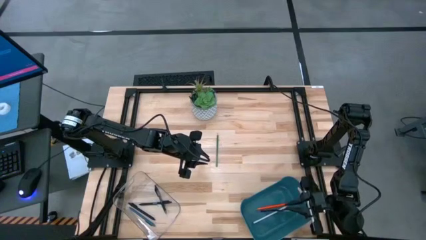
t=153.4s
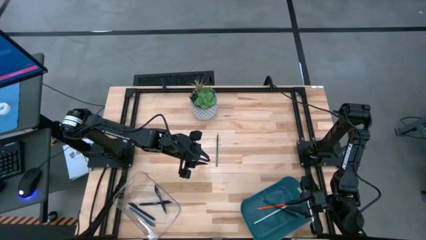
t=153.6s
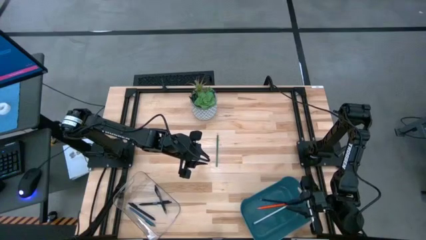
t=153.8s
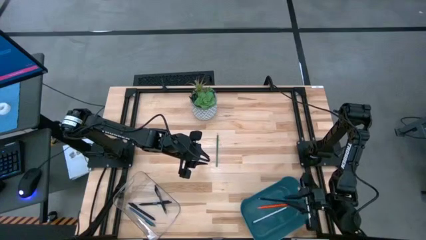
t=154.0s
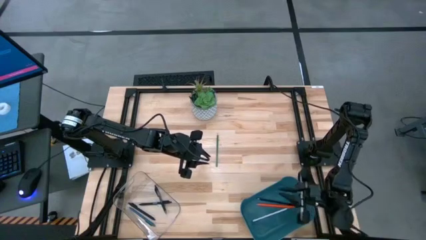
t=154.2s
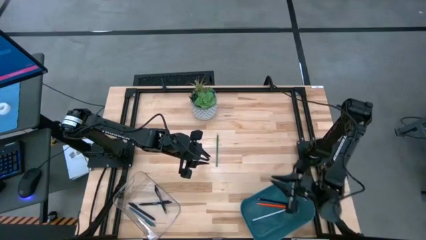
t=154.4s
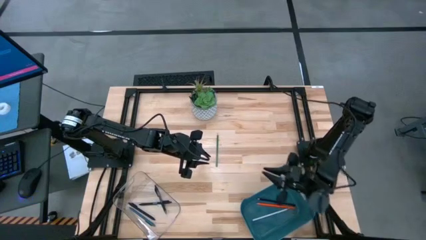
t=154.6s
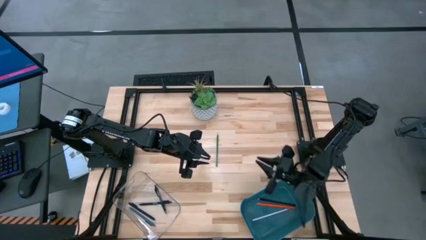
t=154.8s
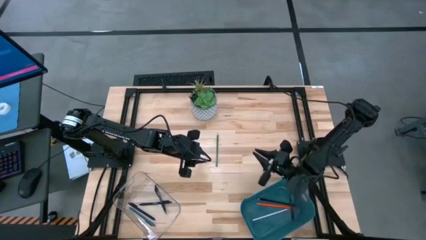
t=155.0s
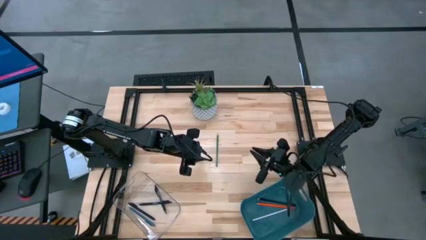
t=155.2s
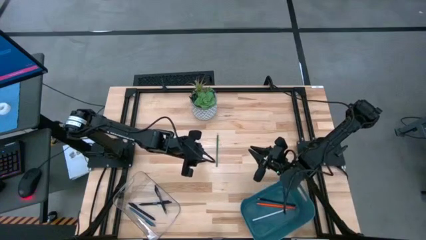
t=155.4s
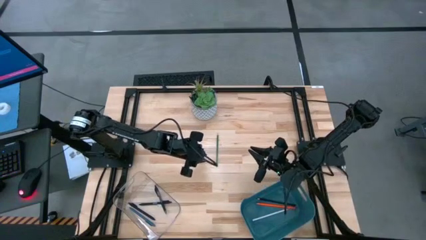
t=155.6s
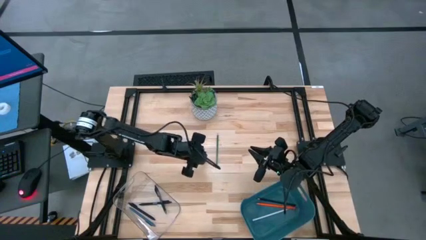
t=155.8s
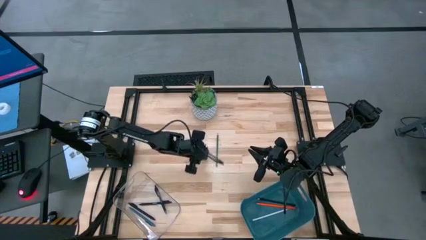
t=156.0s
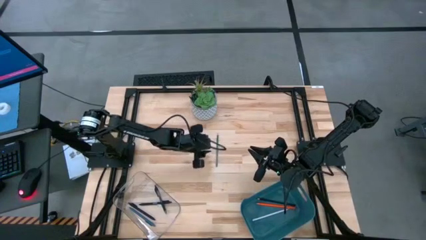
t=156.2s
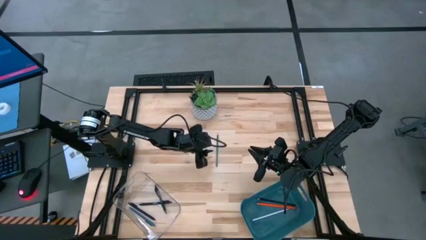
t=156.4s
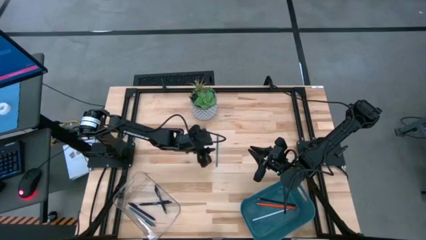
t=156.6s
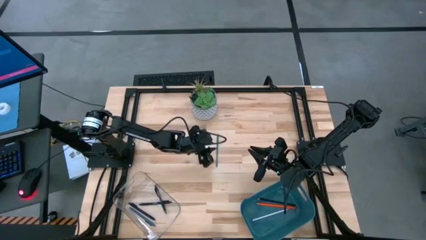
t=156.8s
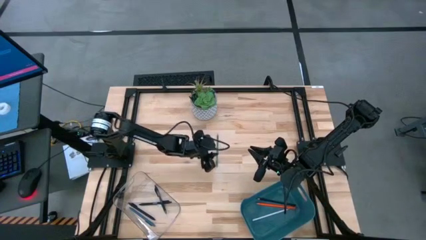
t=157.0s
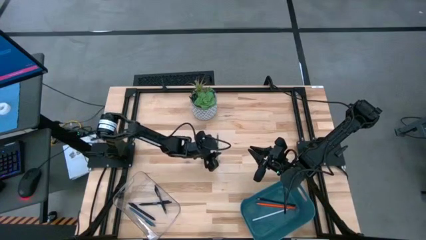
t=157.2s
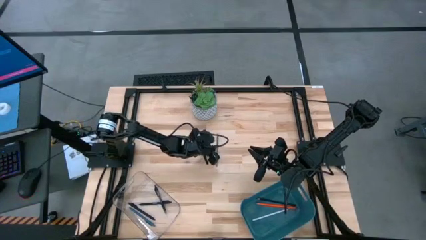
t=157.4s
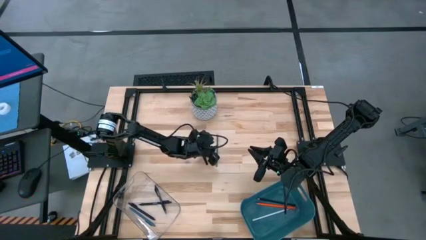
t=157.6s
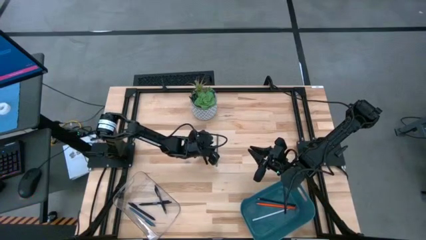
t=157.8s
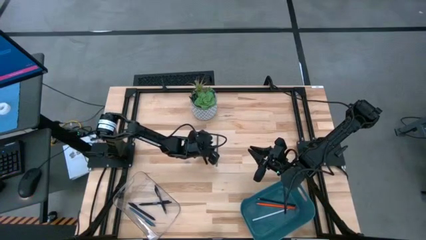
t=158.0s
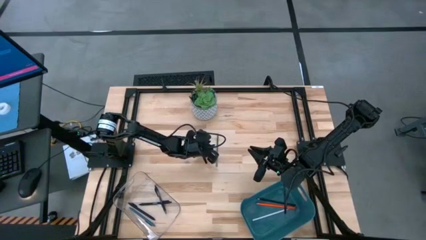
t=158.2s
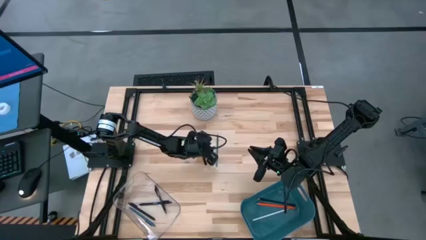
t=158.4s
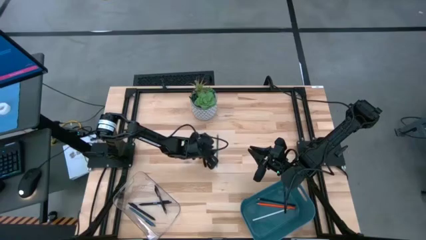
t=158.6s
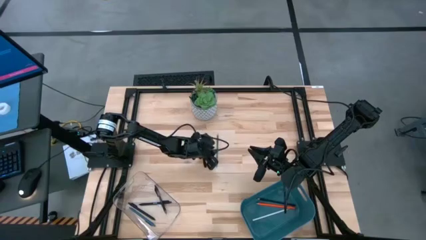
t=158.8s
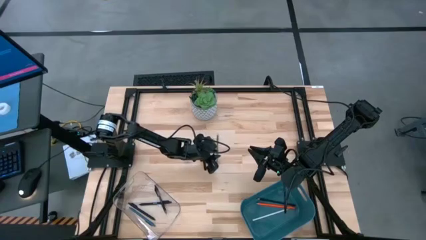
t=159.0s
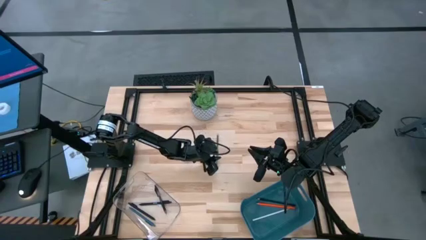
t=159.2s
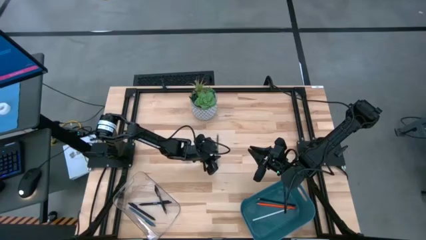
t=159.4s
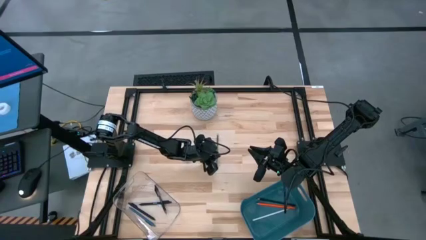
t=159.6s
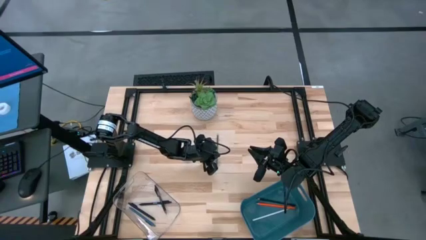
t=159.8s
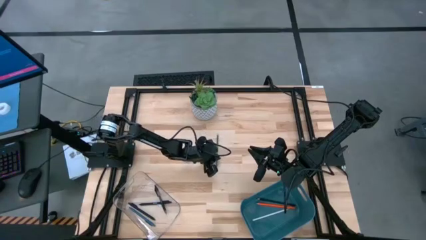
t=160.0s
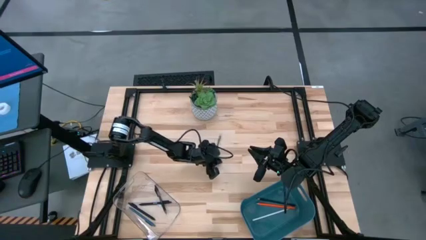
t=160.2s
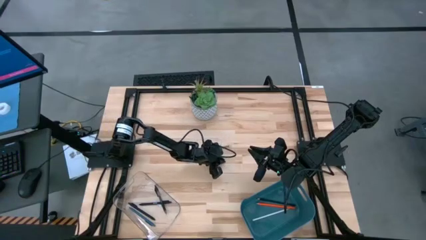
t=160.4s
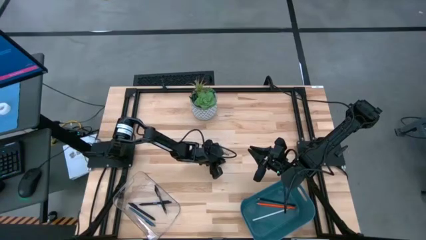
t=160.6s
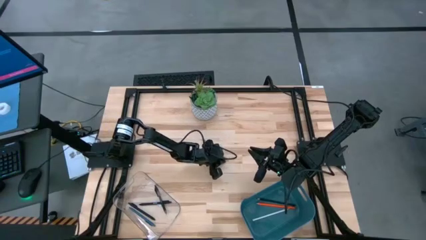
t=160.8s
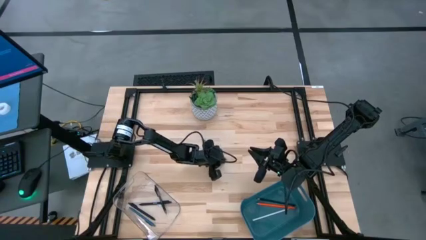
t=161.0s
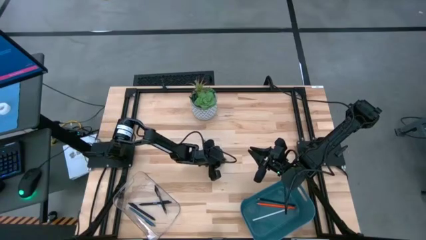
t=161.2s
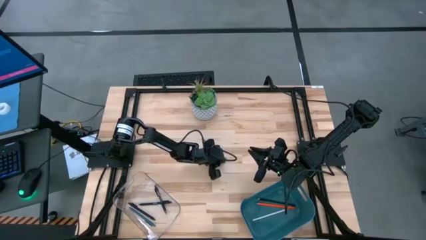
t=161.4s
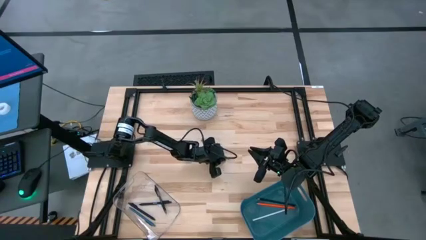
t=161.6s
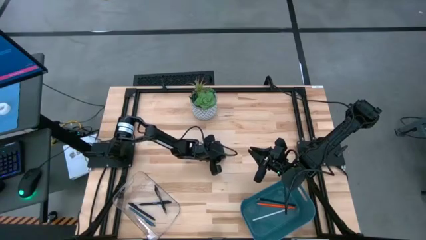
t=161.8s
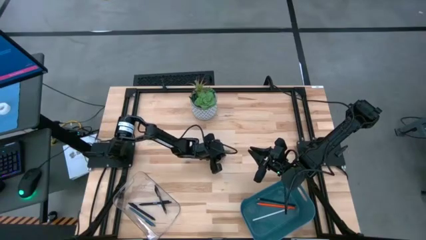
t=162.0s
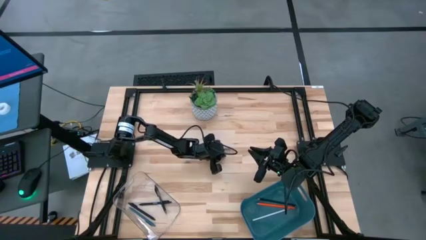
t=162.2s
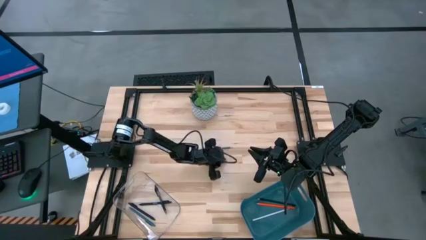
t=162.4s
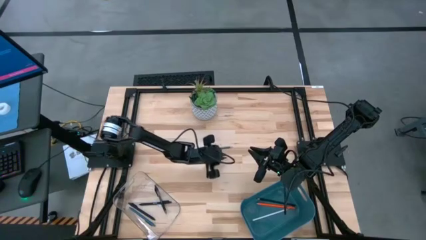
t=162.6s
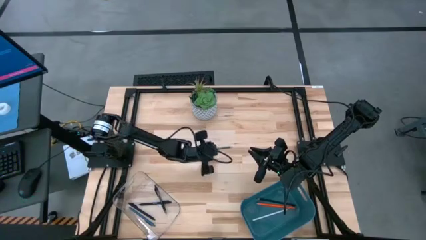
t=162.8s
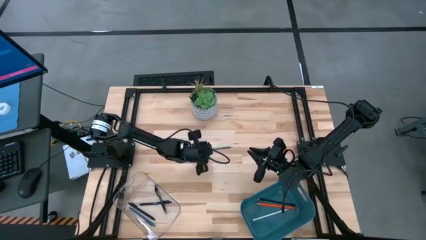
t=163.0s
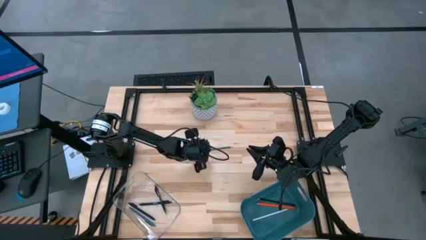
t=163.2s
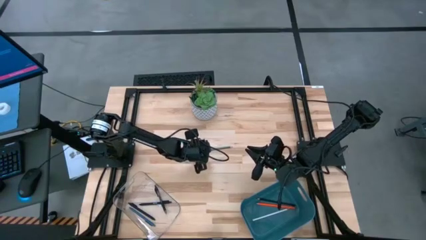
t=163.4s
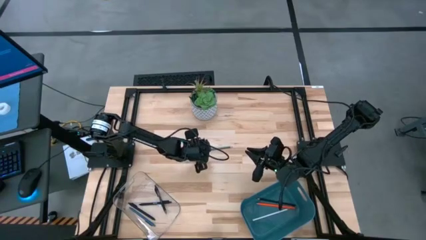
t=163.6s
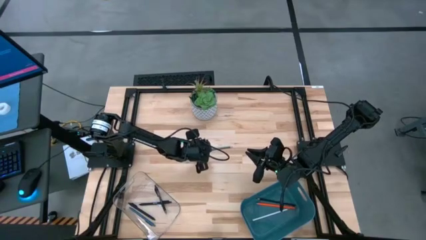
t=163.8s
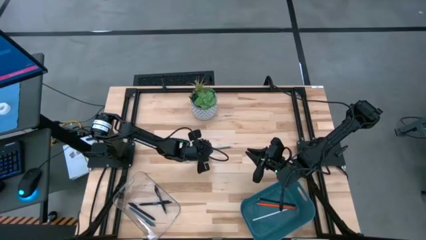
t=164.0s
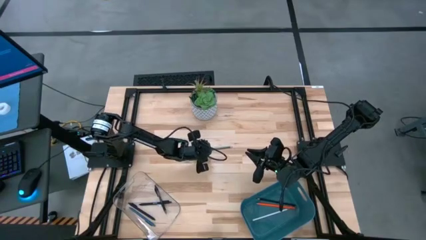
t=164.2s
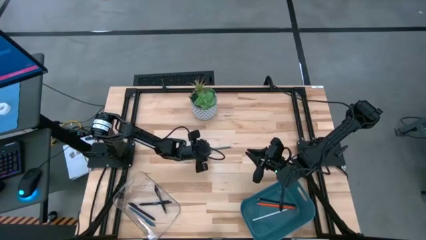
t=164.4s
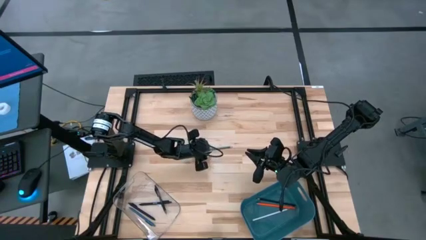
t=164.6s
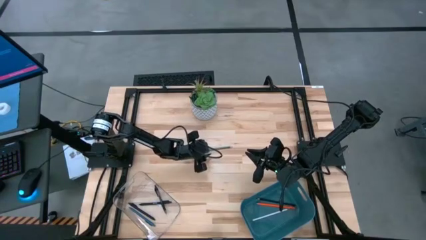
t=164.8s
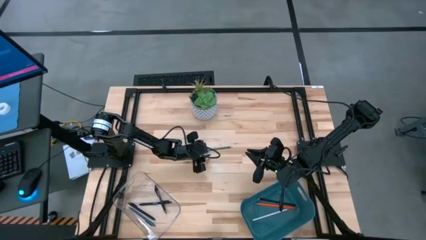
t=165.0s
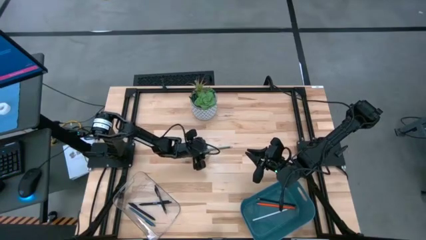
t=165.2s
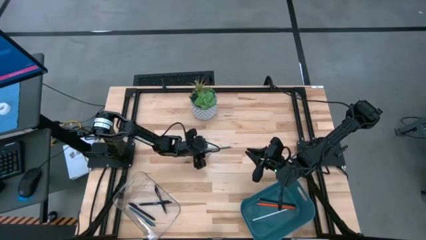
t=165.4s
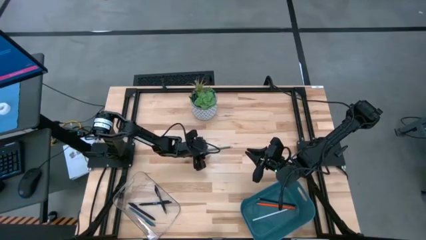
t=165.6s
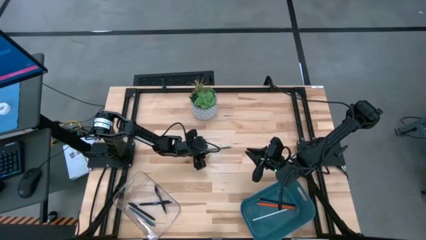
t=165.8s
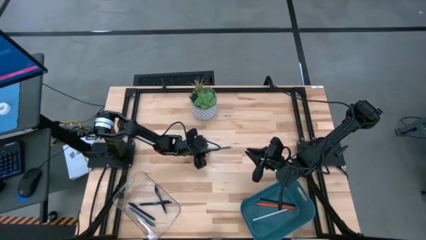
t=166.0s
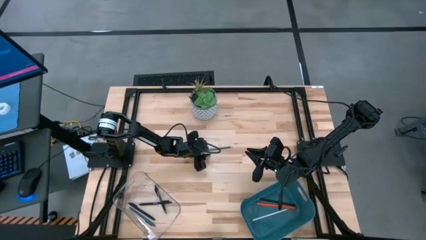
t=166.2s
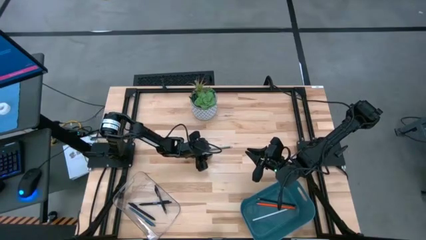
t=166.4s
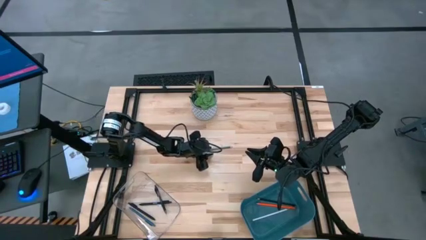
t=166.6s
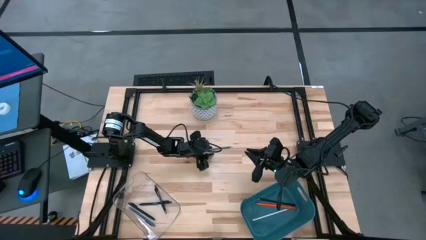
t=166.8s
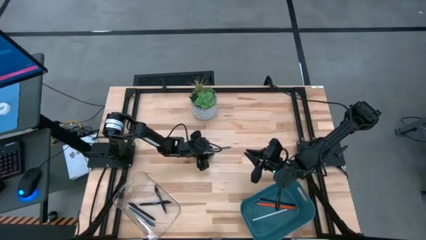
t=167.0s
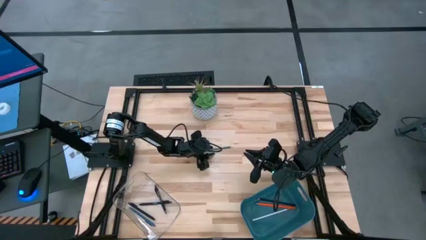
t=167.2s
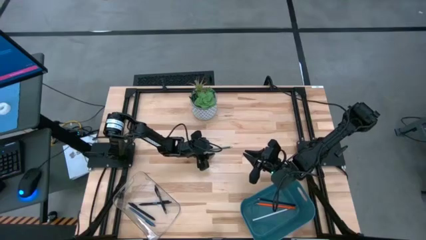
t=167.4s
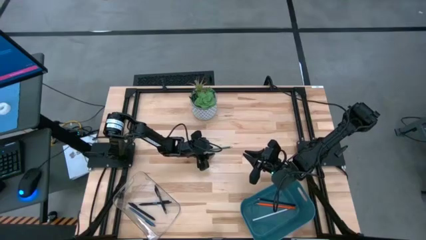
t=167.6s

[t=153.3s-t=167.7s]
Task: Sort pens & pencils
Put the green pencil into the blue bin
